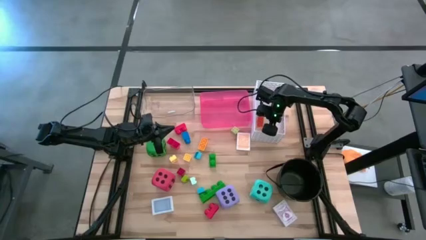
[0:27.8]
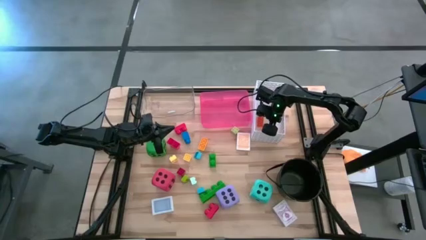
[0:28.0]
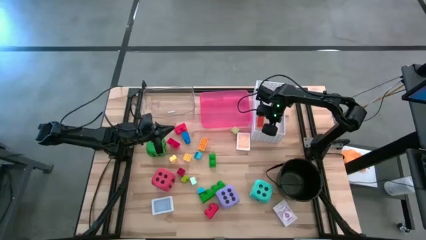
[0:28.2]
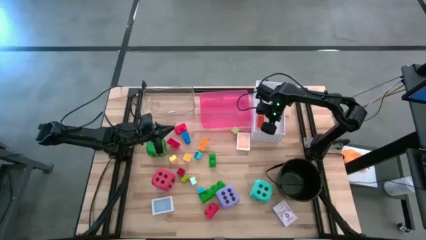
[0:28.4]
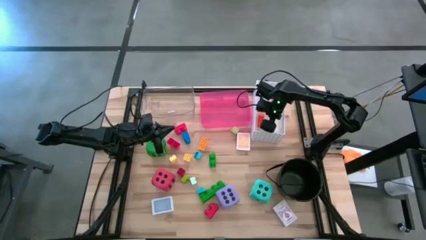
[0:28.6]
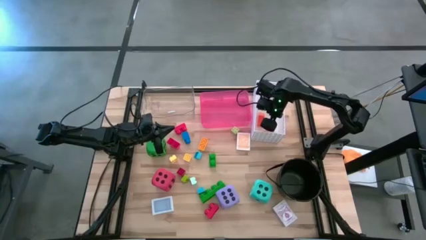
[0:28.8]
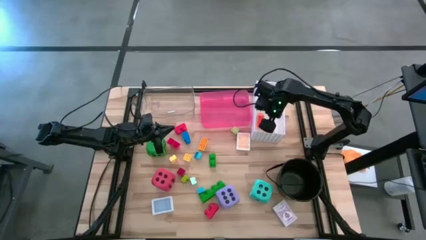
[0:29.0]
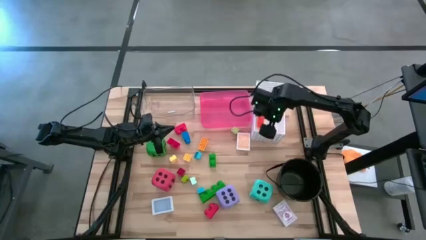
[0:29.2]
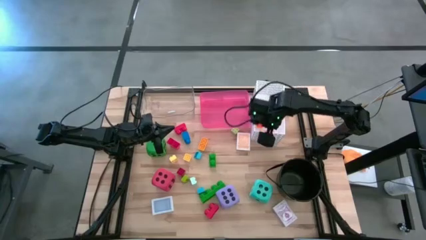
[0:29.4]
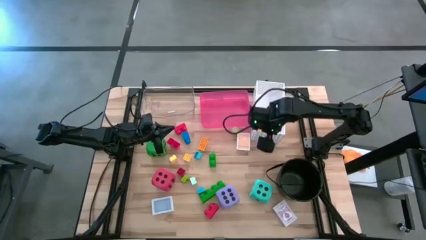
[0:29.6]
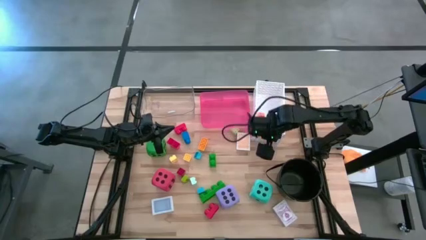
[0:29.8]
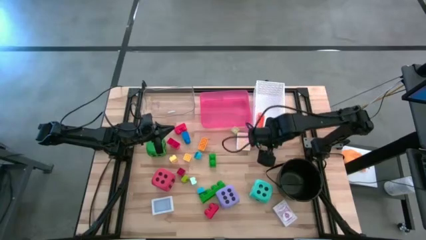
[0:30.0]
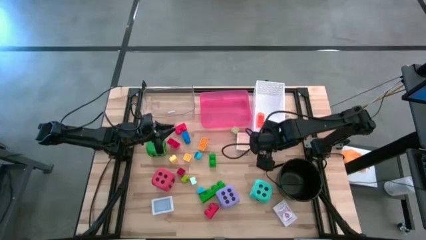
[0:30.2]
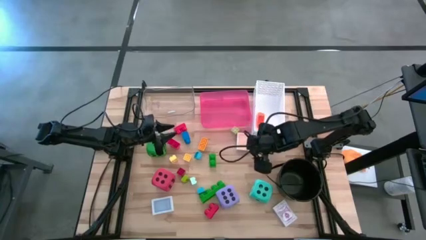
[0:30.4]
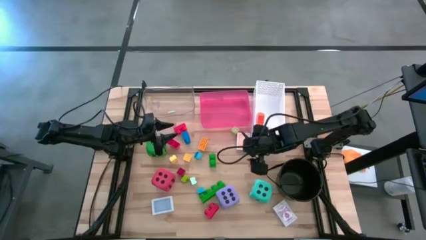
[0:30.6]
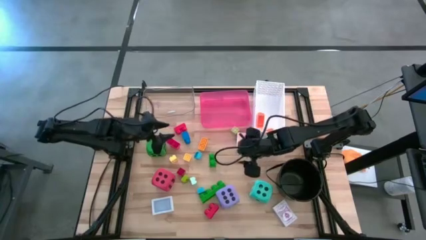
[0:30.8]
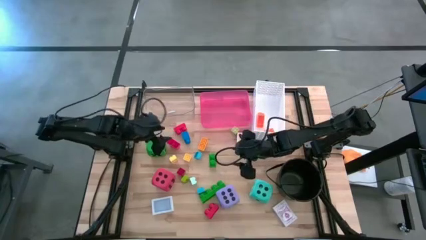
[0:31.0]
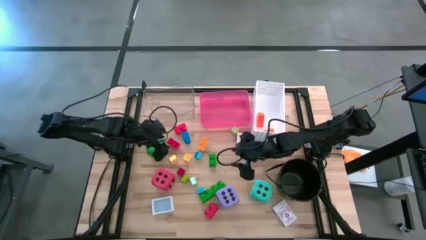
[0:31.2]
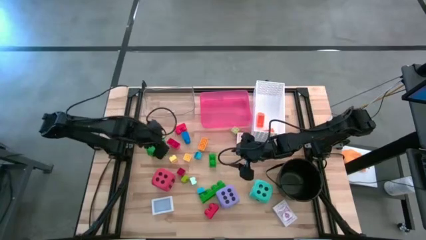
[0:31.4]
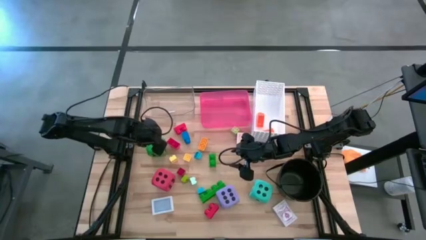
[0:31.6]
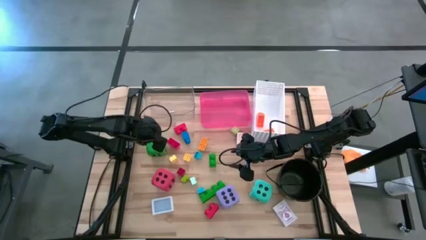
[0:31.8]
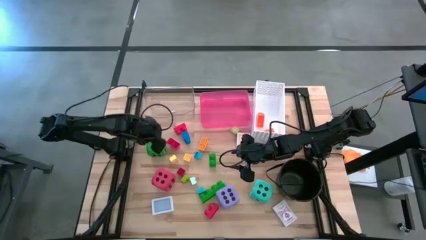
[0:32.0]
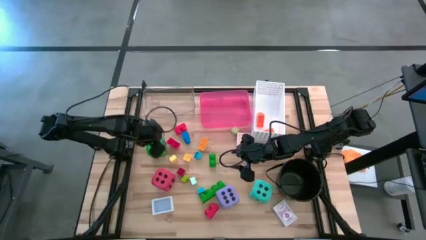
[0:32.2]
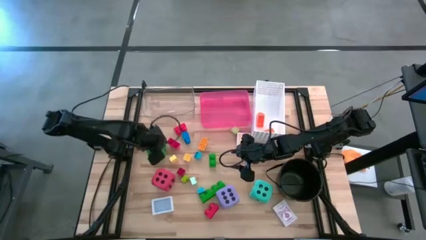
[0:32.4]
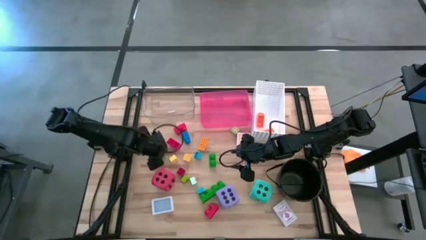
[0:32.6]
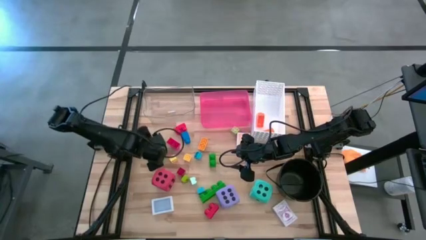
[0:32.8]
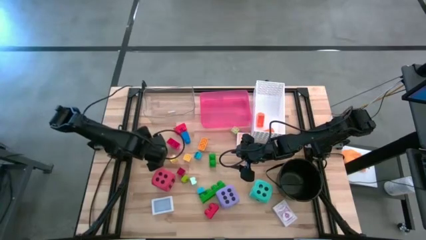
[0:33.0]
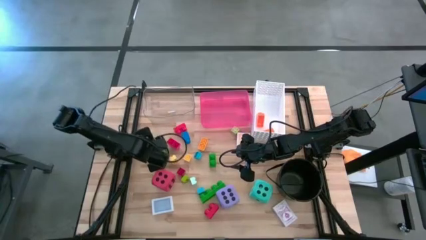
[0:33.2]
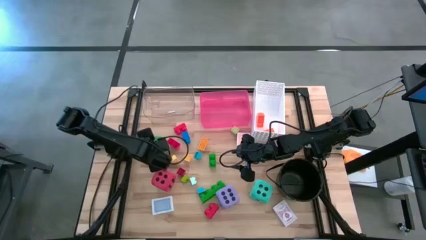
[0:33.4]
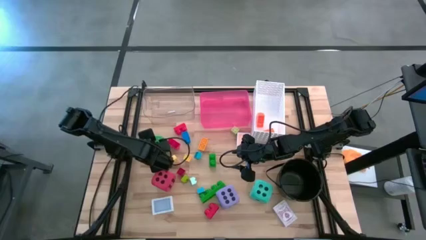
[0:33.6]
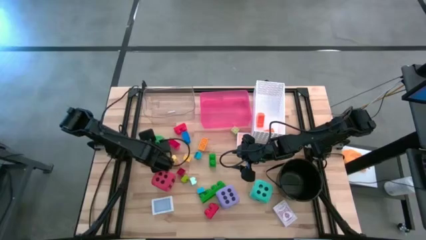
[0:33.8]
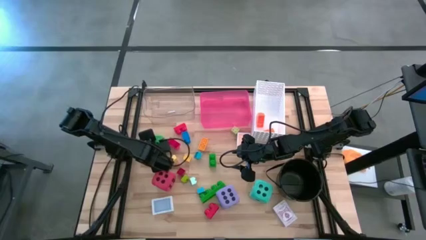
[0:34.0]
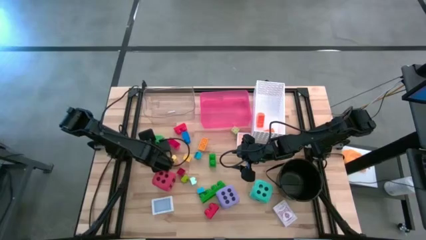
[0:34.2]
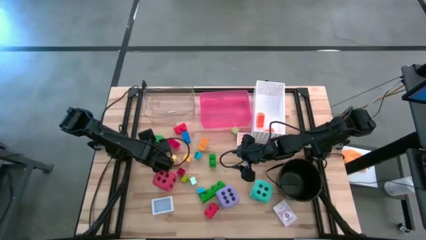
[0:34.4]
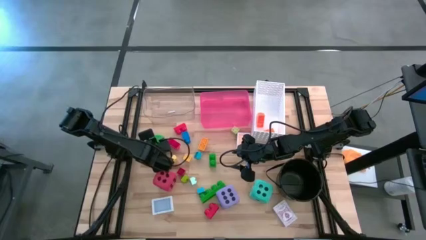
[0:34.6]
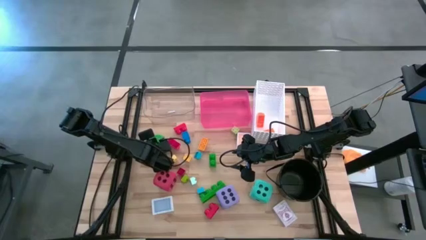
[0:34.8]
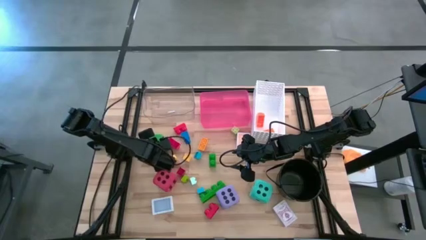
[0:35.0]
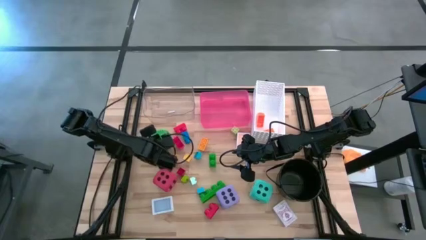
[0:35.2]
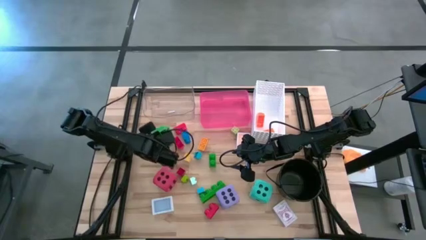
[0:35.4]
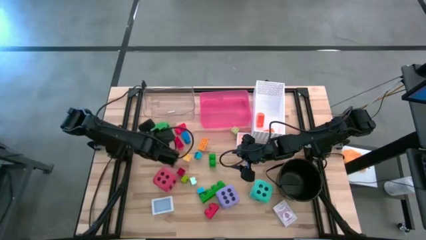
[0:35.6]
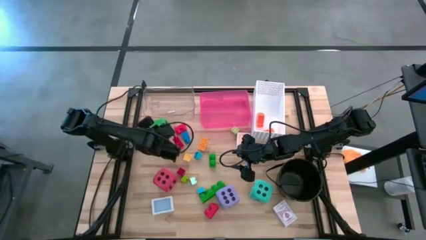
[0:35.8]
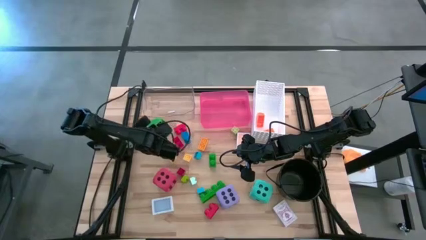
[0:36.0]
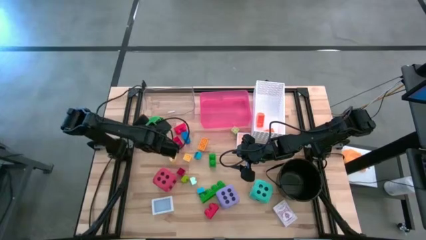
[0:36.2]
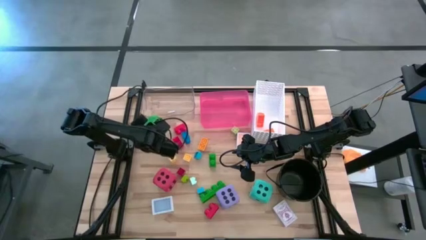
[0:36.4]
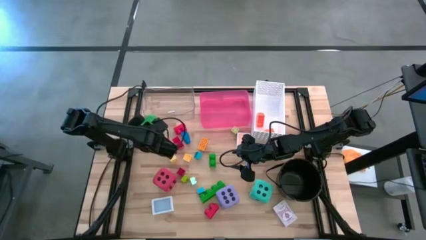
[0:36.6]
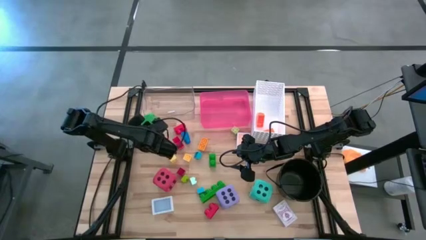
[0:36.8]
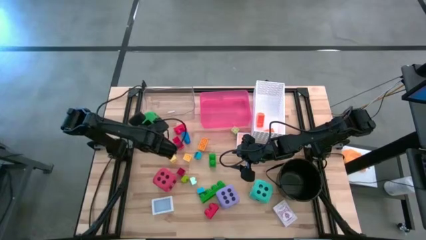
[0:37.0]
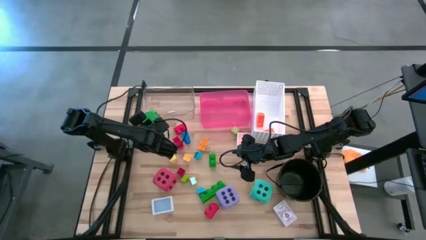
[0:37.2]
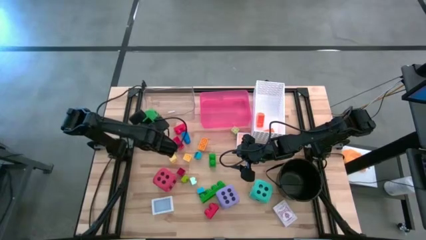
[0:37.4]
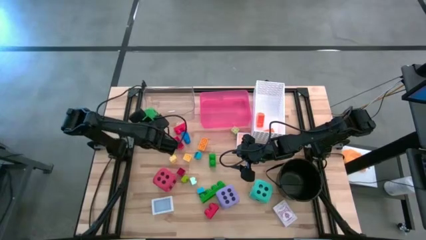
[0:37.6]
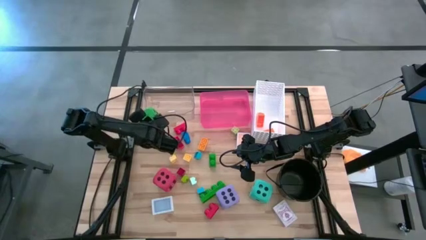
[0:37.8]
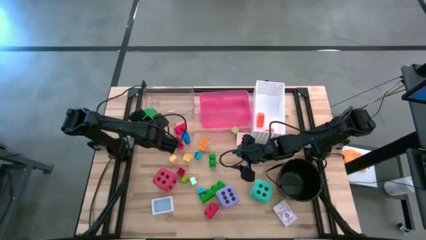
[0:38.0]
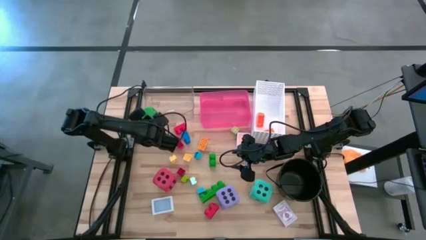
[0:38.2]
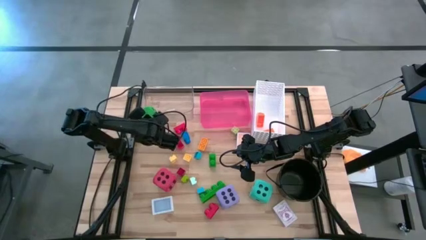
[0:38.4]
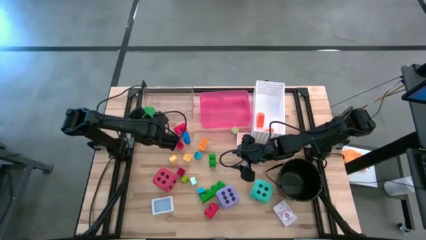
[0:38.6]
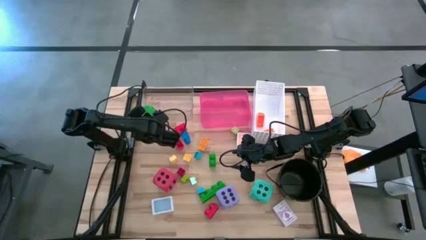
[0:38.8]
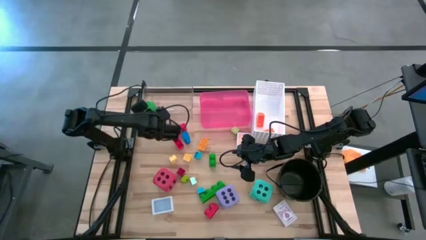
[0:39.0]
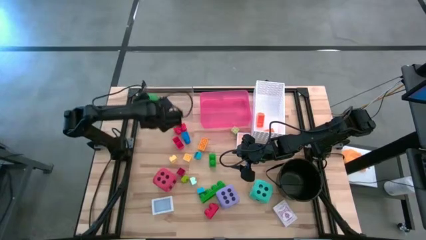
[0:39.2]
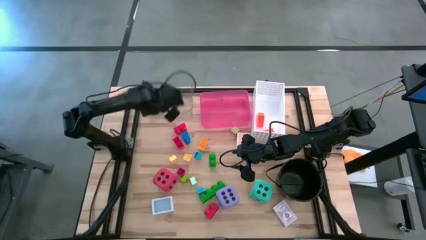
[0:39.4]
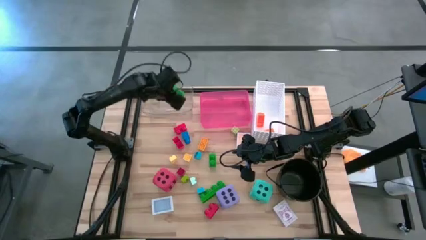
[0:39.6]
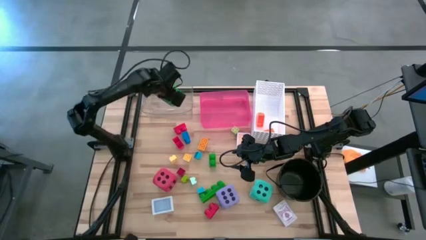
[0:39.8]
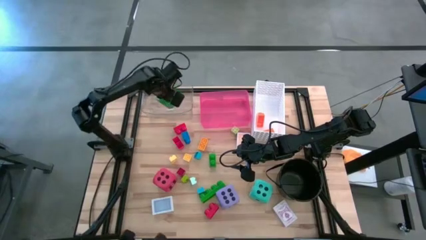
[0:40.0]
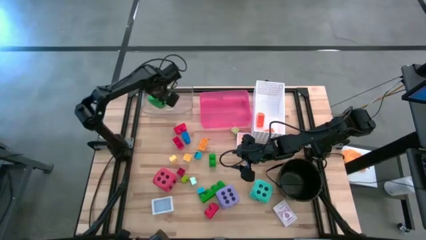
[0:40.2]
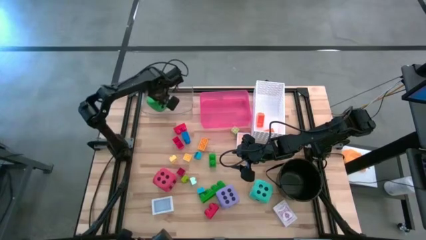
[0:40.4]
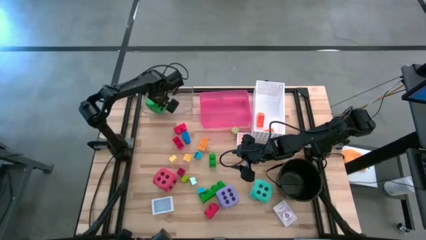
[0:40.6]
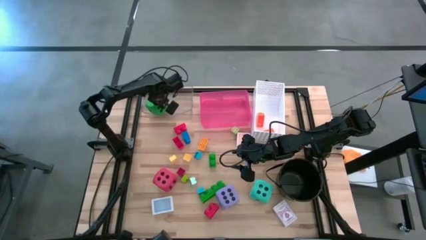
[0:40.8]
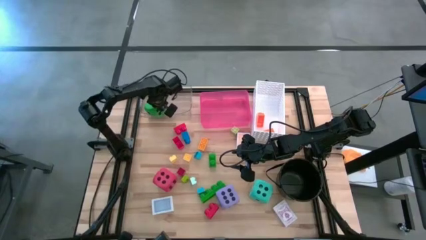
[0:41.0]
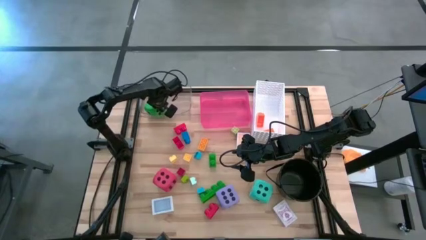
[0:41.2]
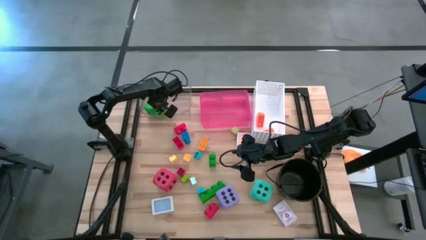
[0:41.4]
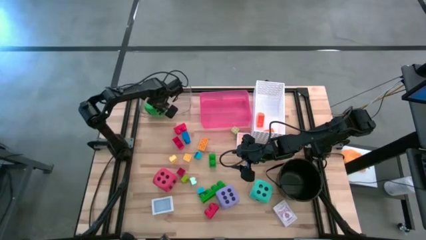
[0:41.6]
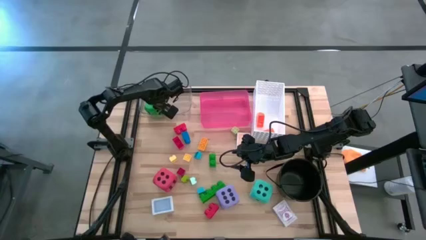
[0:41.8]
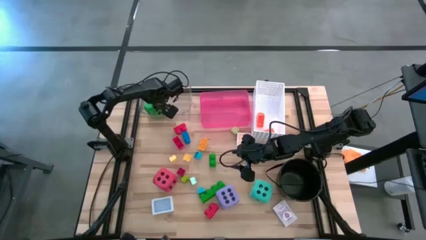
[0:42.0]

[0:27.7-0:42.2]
Task: Pick & Place Toys
Put the green die into the transparent bin

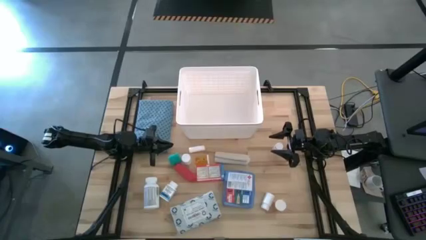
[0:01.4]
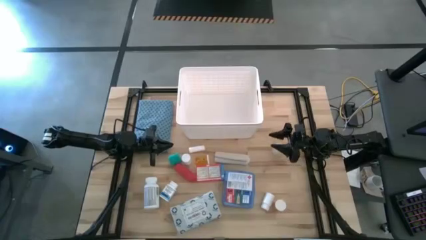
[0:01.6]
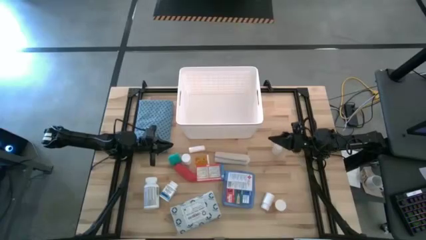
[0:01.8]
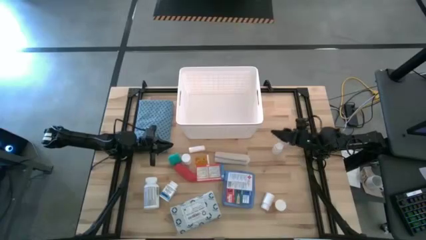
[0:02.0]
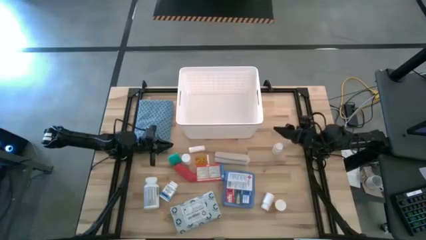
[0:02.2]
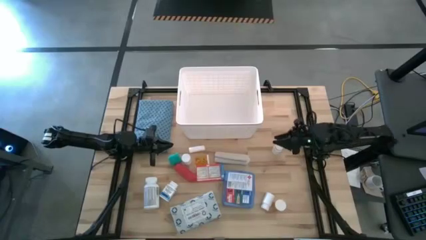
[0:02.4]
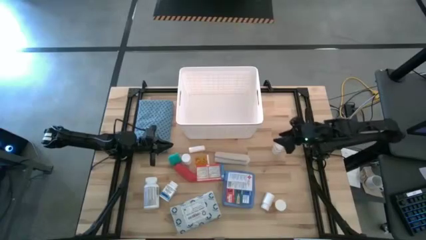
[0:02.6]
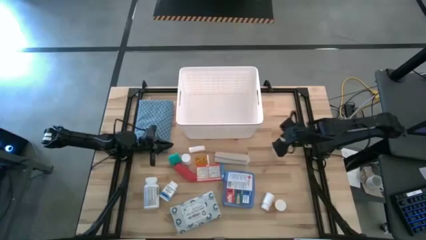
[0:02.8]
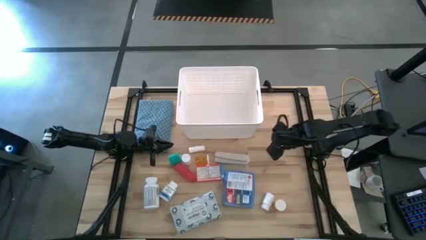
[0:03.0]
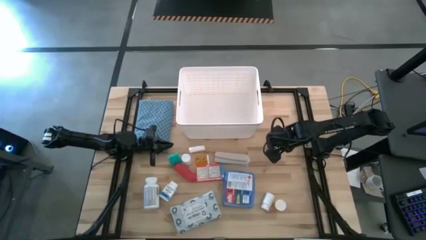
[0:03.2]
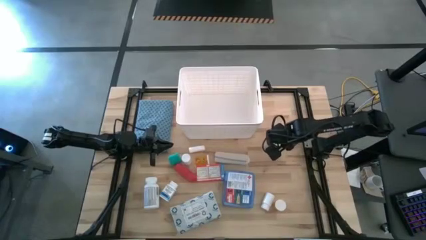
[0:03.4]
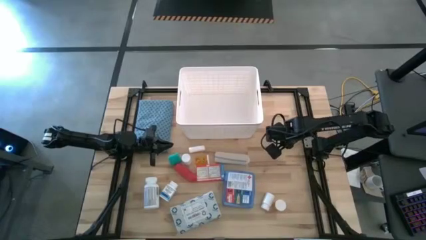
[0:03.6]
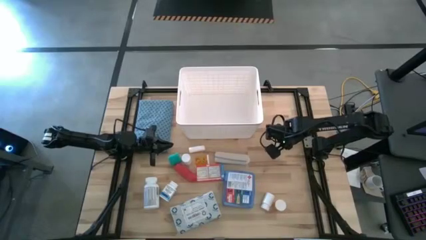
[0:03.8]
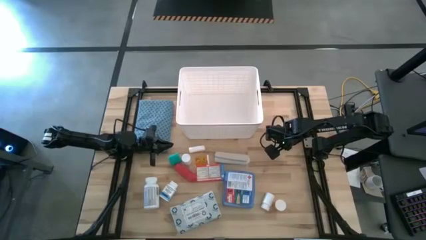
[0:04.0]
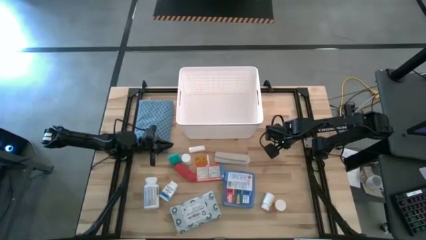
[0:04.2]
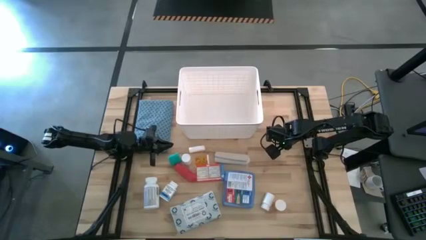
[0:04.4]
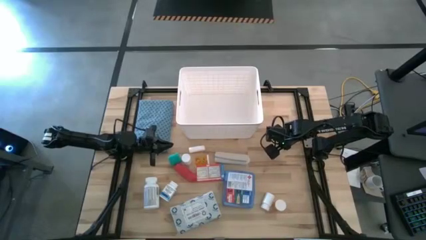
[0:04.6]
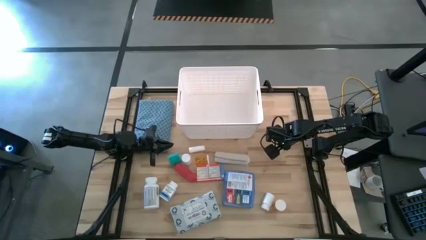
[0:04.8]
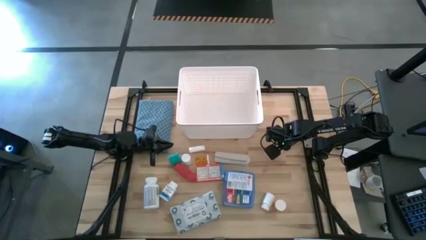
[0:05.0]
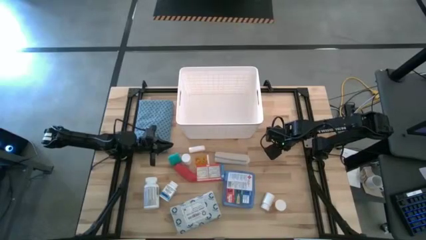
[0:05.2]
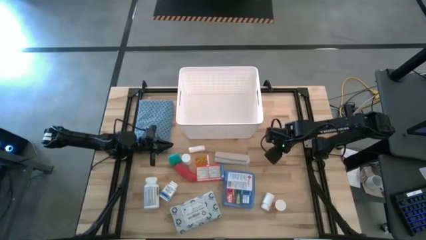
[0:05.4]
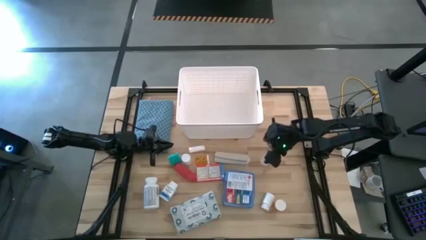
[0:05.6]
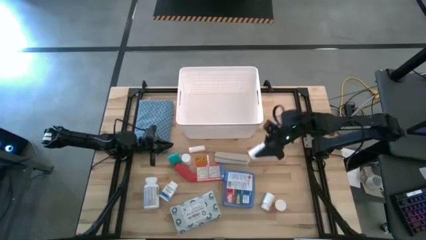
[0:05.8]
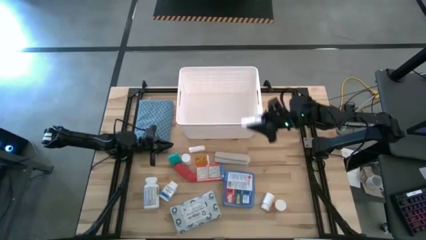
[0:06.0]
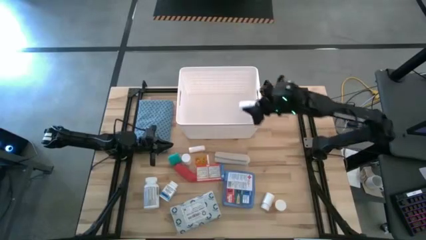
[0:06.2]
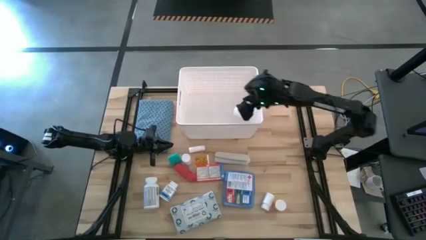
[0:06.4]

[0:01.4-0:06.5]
Task: Pick & place medical supplies in basket/bin
Put the white medicine bottle into the white bin
